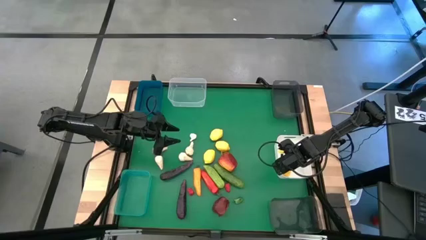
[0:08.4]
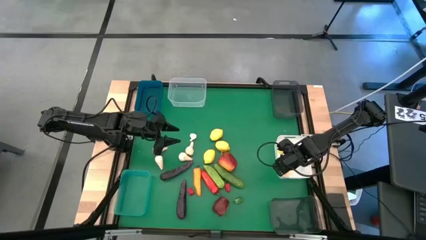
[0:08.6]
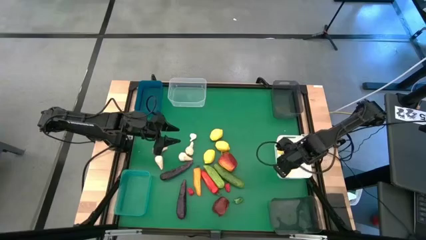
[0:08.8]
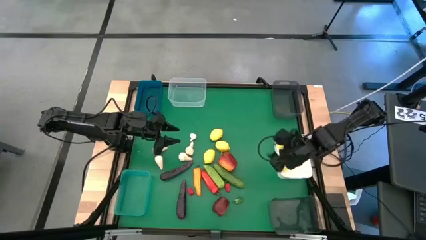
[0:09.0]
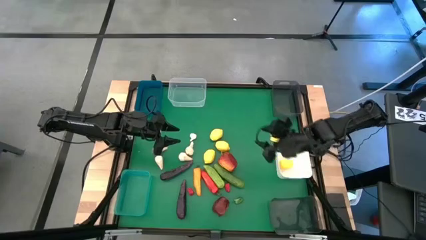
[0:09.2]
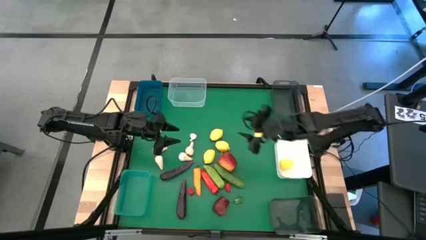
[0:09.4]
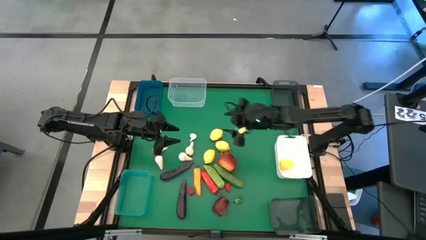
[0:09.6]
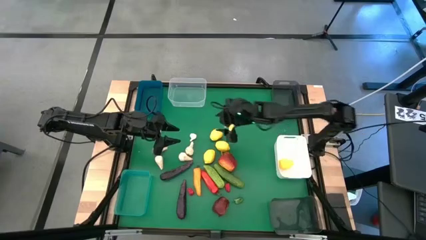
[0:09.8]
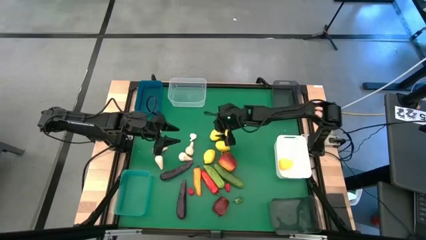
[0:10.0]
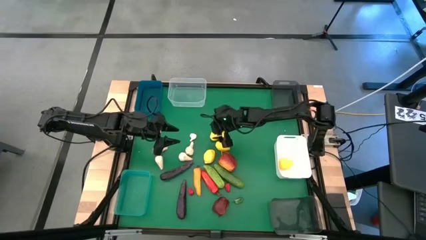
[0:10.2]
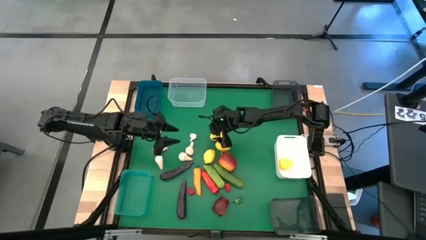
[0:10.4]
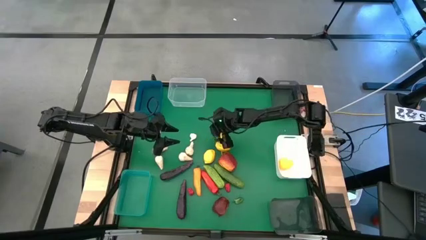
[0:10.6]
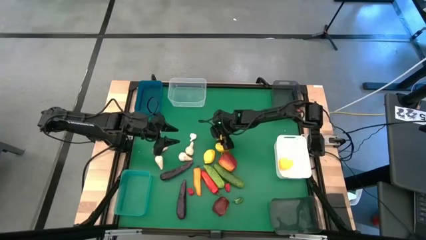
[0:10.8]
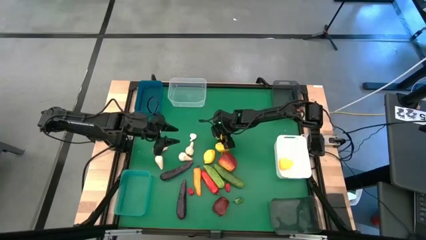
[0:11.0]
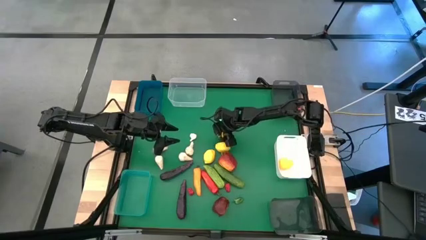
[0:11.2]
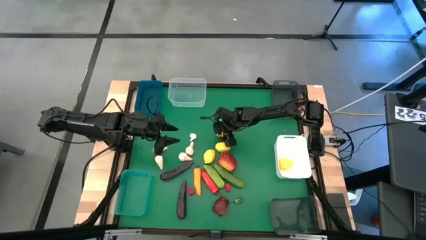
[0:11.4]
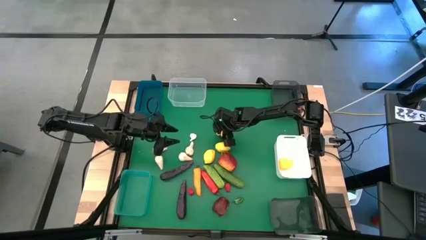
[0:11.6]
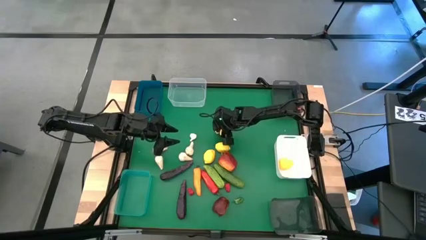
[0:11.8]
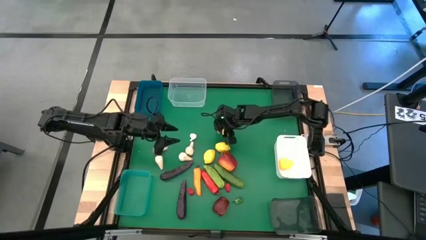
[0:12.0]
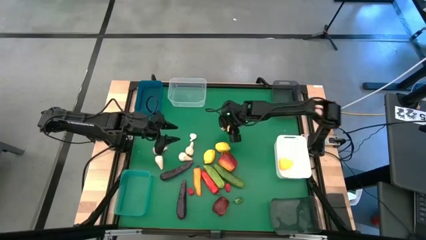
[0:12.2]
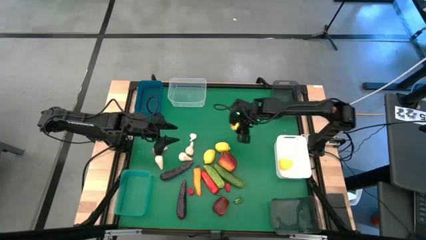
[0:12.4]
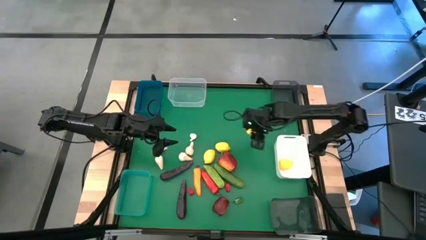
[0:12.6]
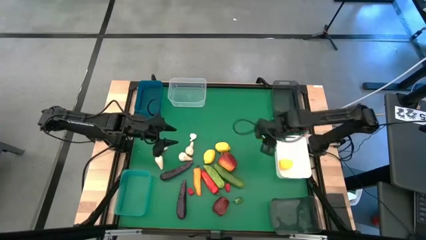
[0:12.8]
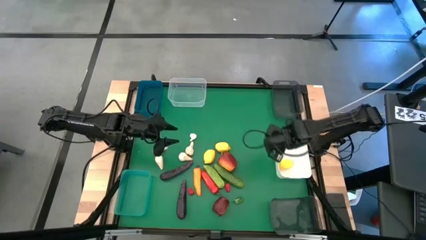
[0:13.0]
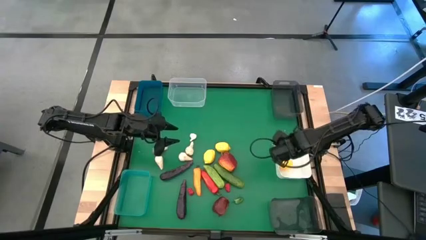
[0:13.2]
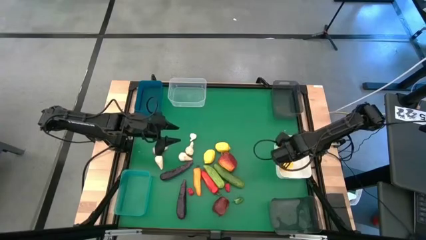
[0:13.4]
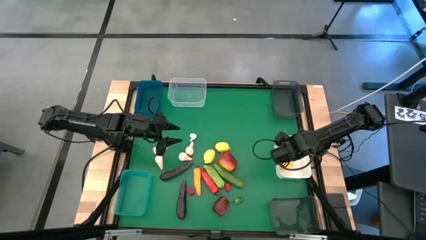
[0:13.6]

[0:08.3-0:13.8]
Task: Sort produce into baskets
Put the yellow lemon into the white bin

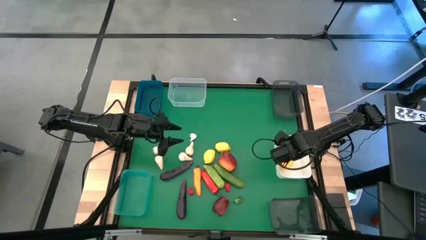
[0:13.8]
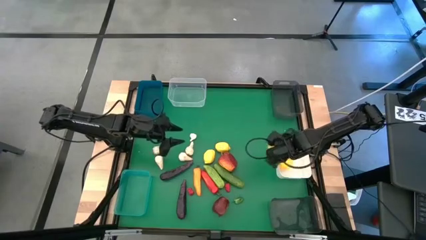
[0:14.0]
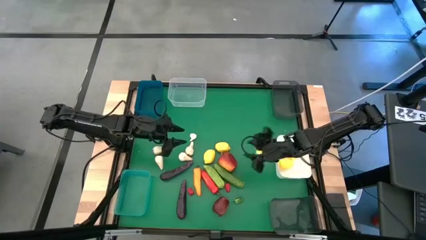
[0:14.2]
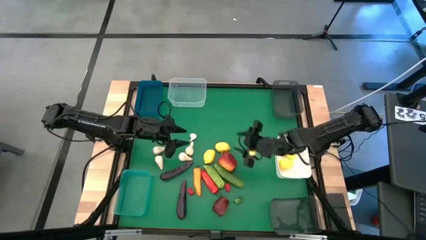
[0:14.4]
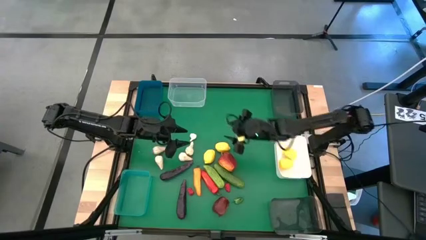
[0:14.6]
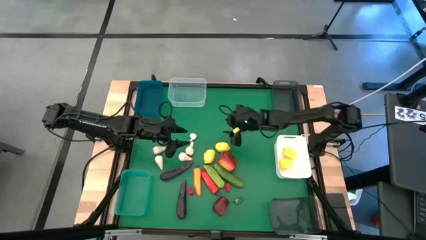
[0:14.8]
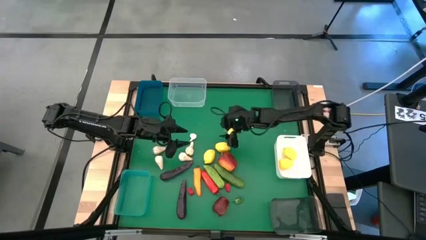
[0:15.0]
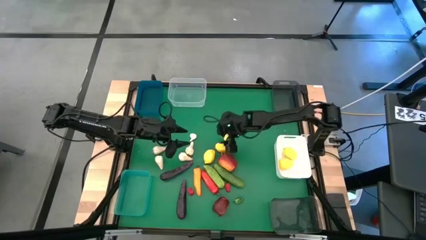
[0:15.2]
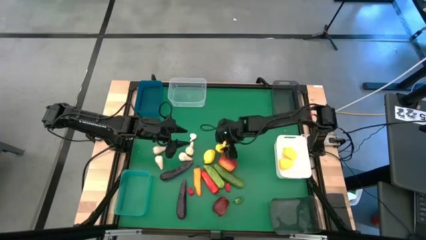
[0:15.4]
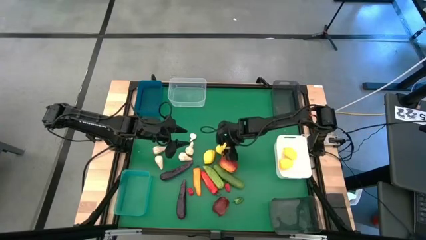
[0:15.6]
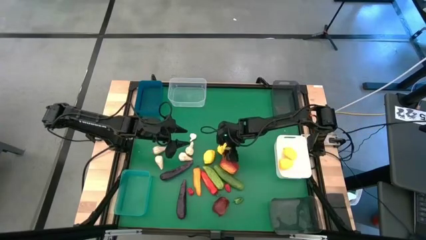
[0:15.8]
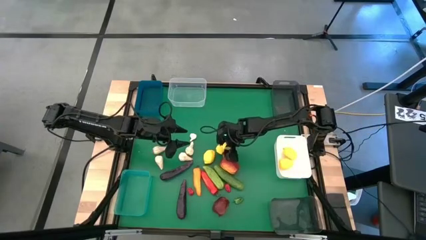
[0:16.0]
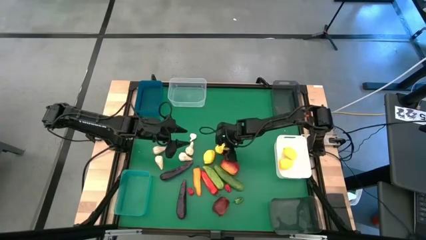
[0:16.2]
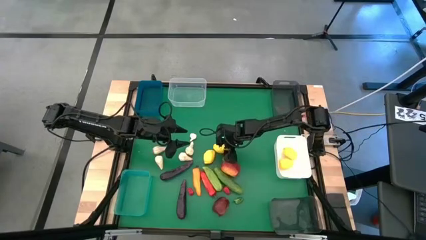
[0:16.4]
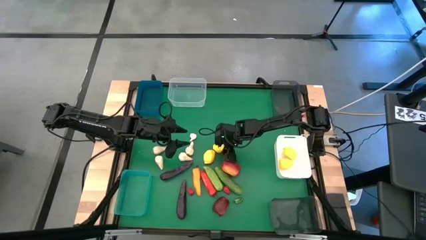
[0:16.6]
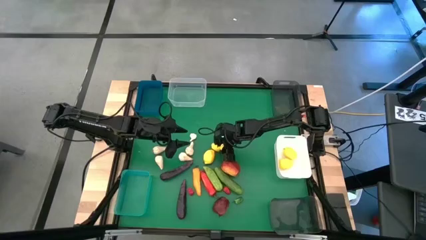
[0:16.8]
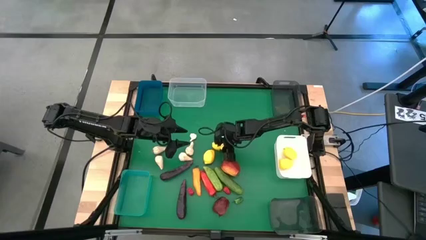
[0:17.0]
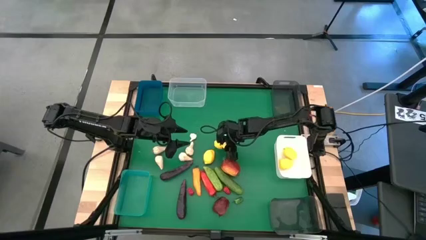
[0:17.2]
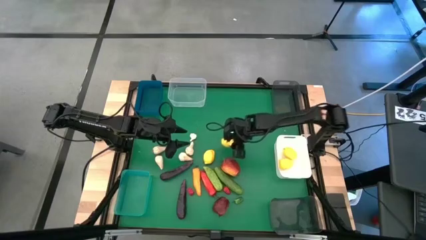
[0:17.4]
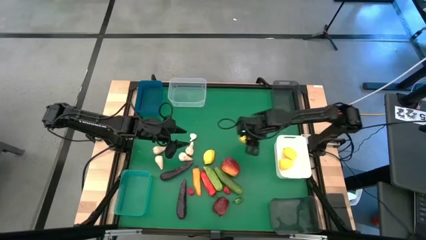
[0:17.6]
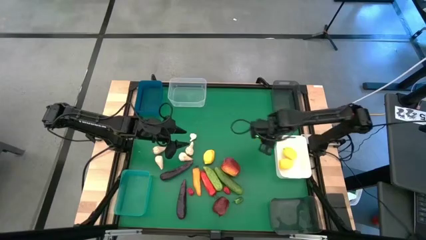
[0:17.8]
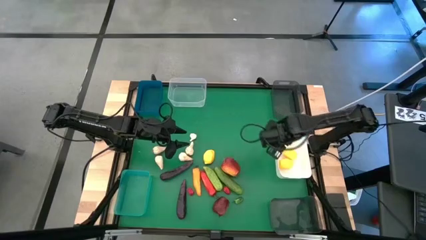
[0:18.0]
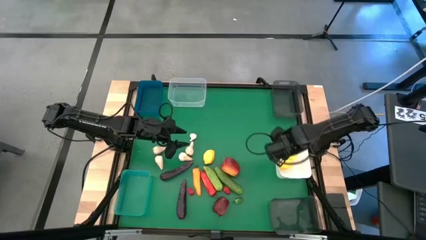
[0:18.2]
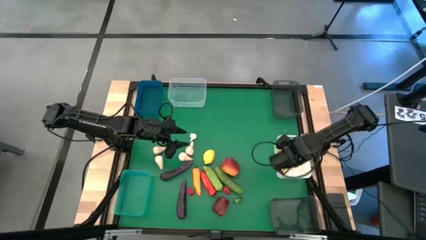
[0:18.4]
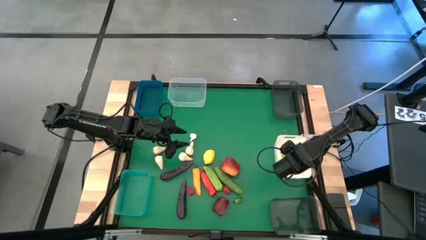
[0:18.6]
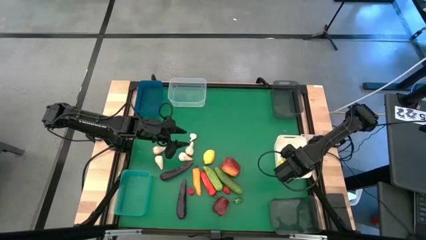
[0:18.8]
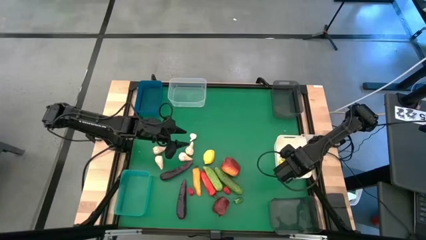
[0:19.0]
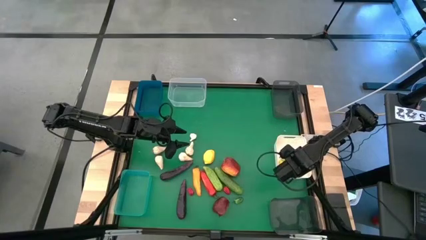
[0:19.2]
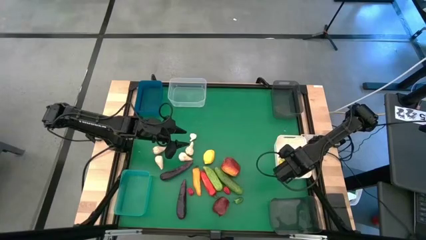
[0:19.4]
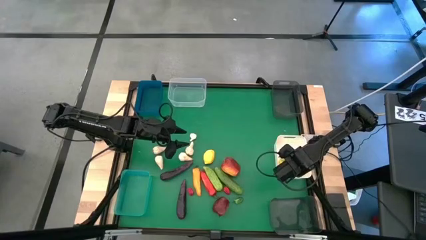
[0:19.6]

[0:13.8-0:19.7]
Put the yellow lemon into the white bin

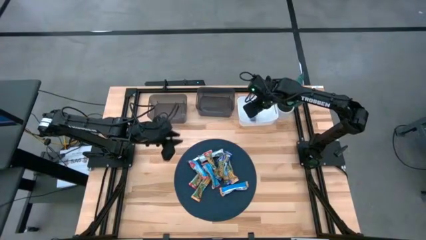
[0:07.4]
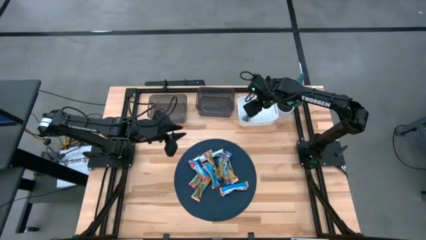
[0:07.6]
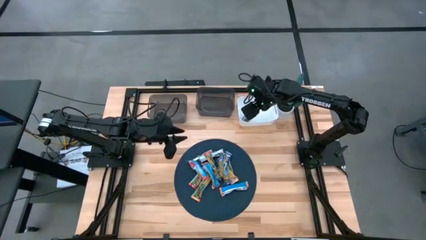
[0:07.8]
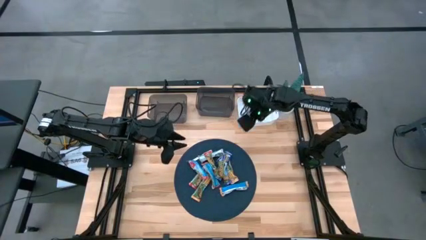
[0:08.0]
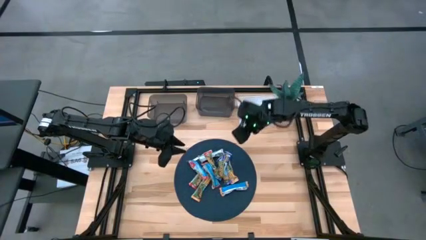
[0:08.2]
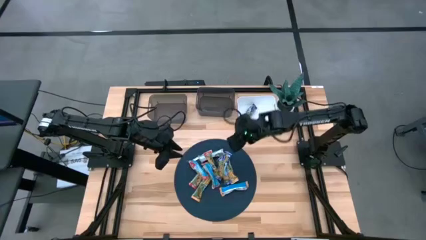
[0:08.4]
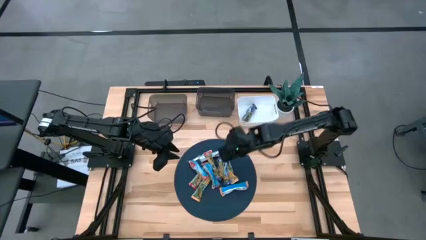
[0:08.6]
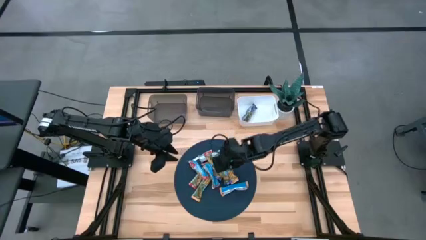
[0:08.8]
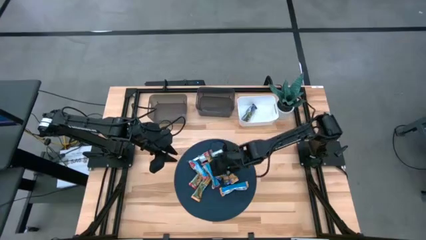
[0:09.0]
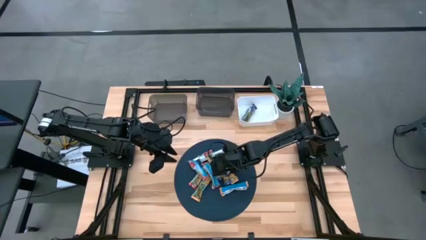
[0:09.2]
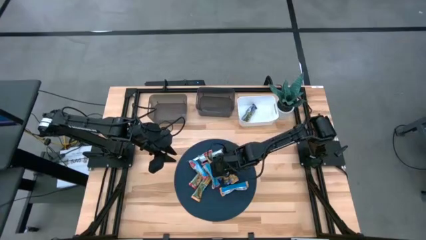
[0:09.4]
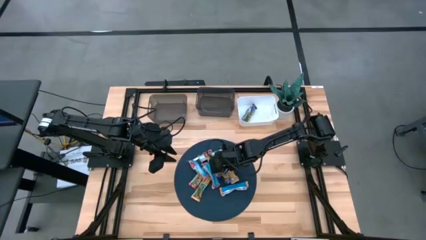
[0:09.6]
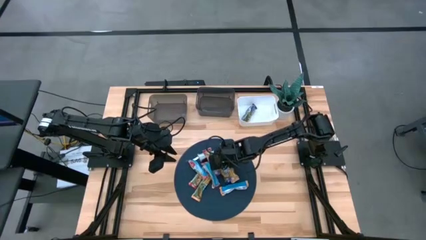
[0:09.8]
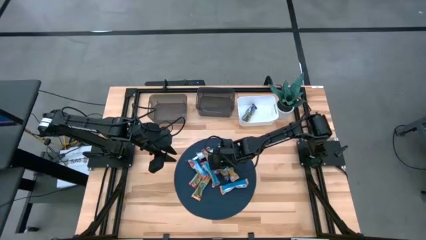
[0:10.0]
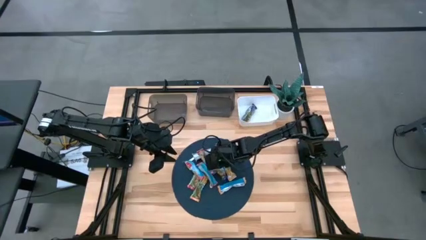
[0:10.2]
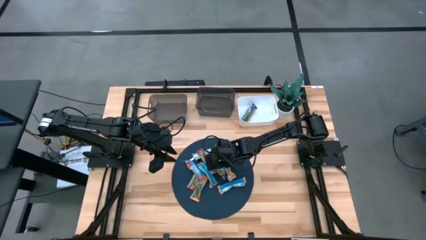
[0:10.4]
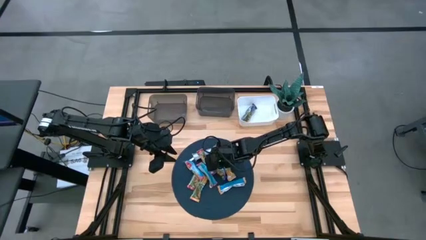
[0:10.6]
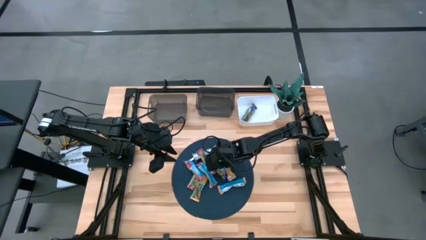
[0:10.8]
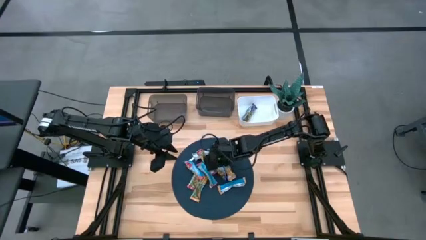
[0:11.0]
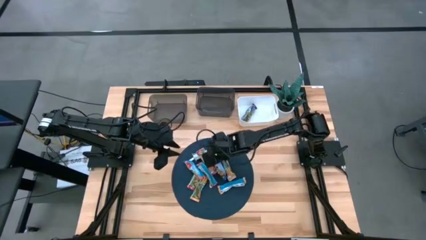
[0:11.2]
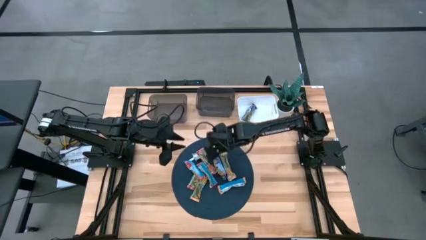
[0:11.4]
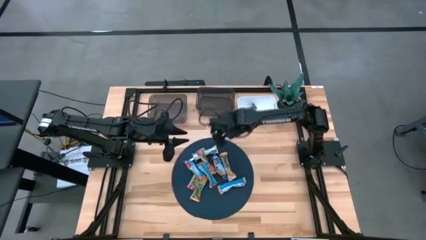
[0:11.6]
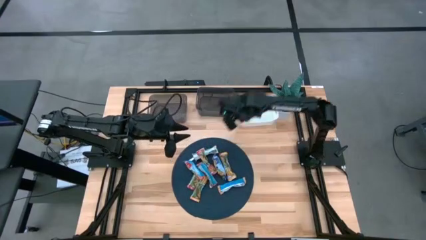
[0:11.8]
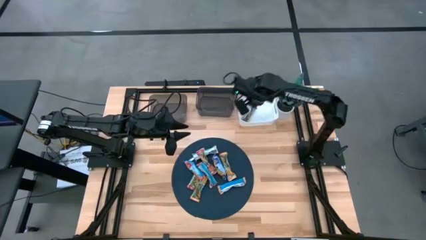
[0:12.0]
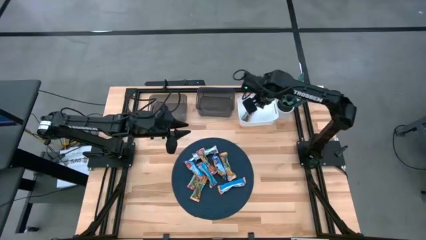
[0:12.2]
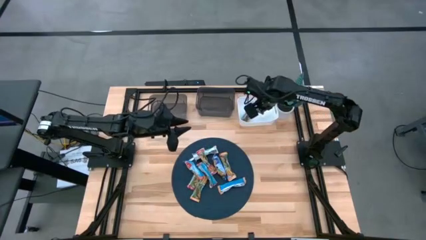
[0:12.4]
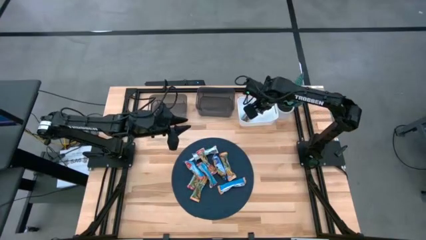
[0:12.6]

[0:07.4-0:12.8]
Task: Pick and place Granola Bars by type
Put the blue granola bar into the white bin
